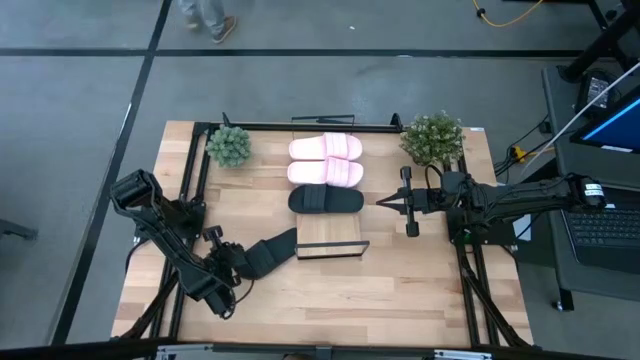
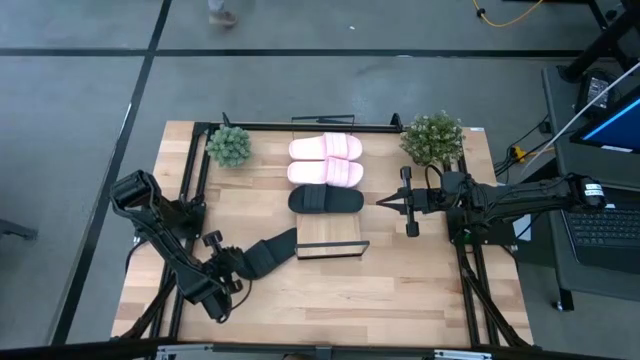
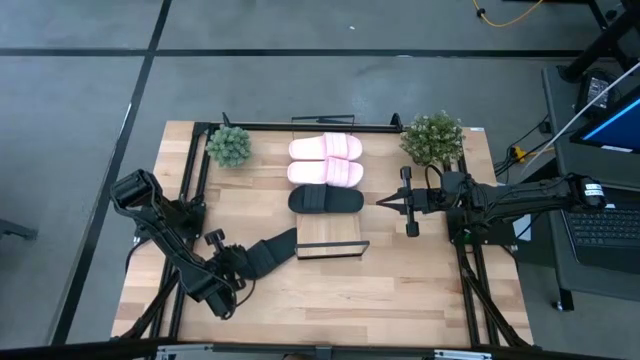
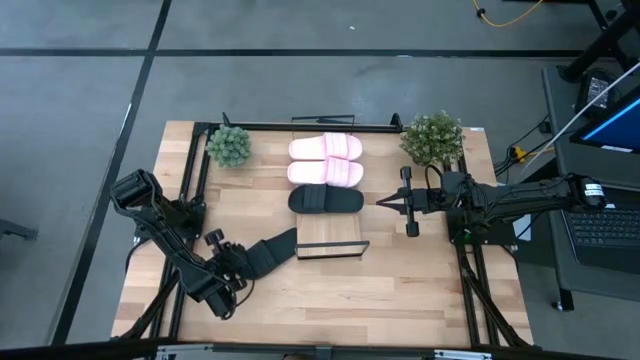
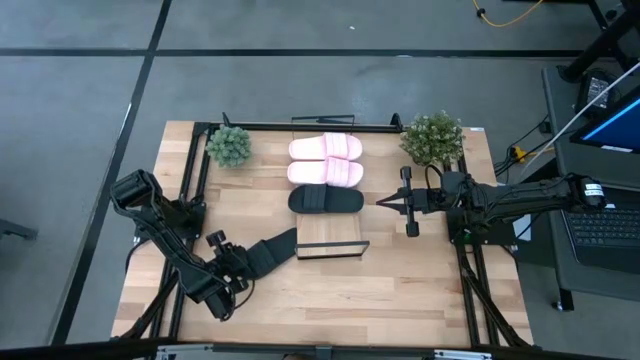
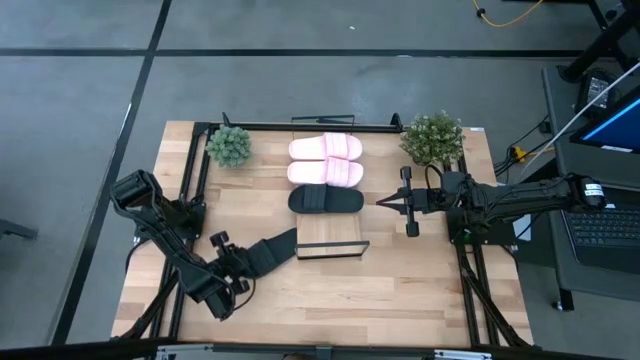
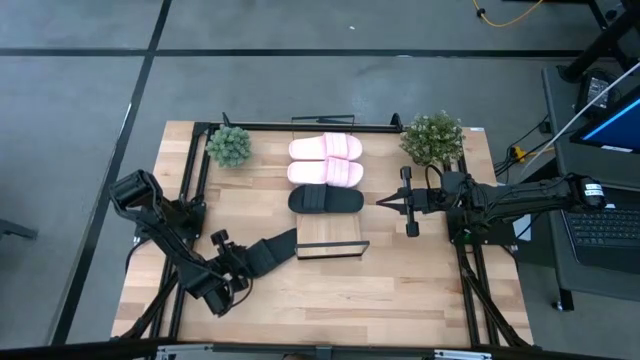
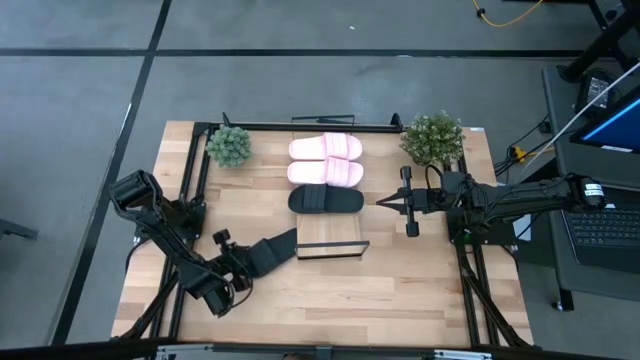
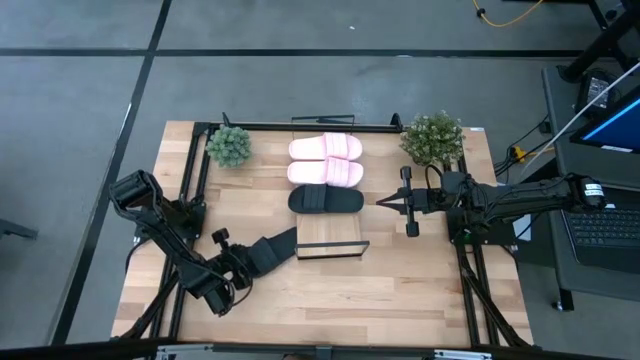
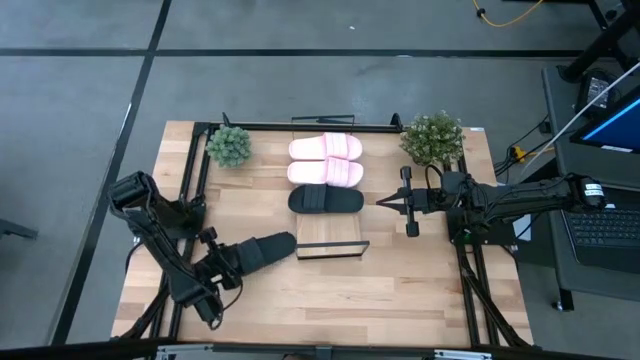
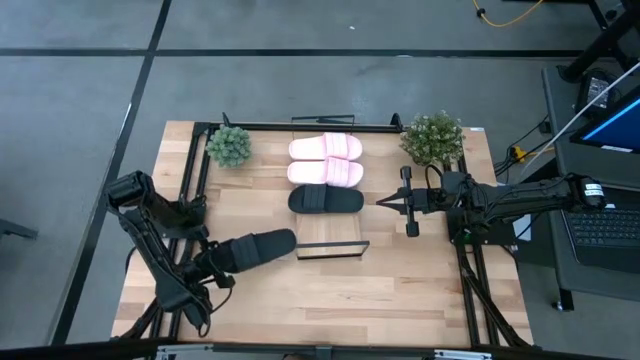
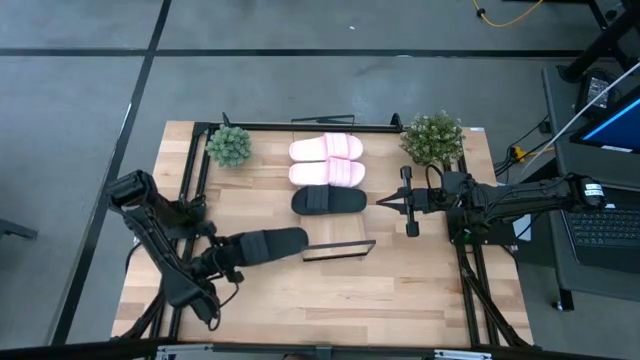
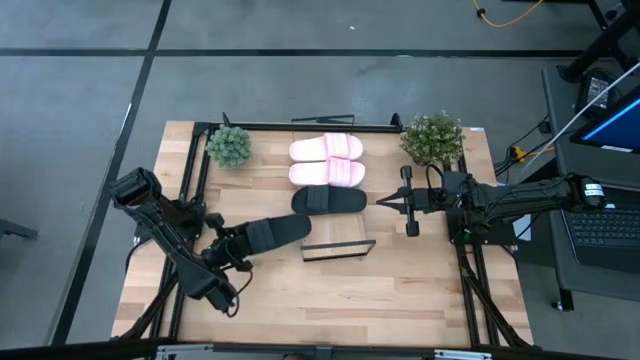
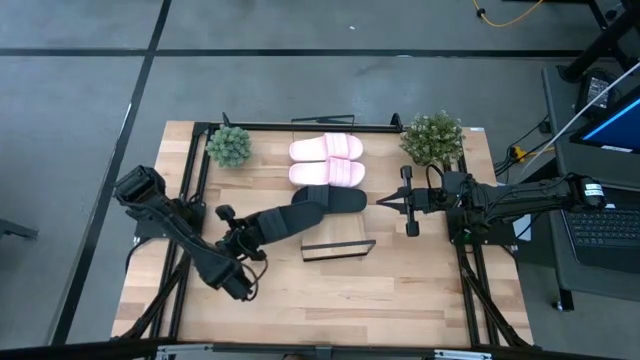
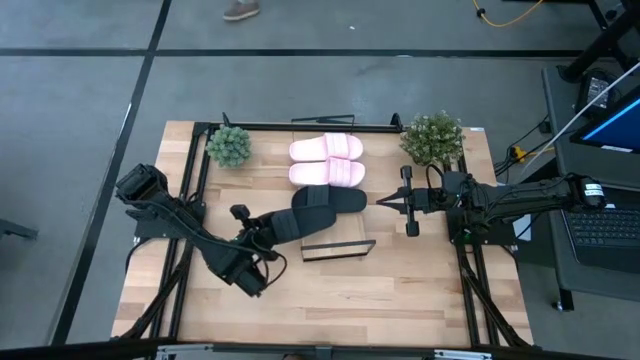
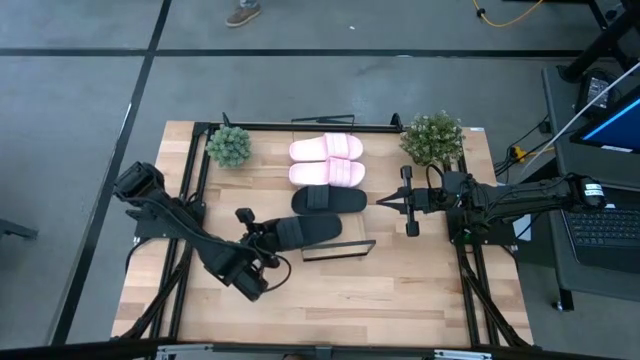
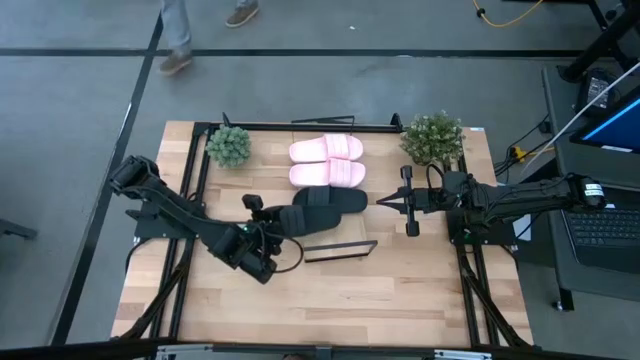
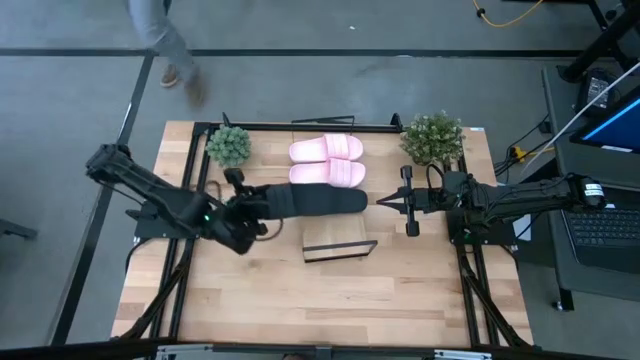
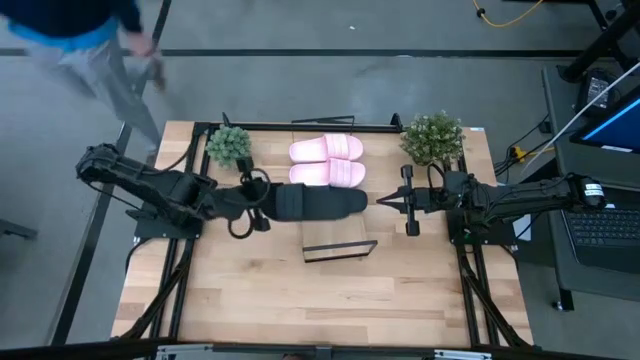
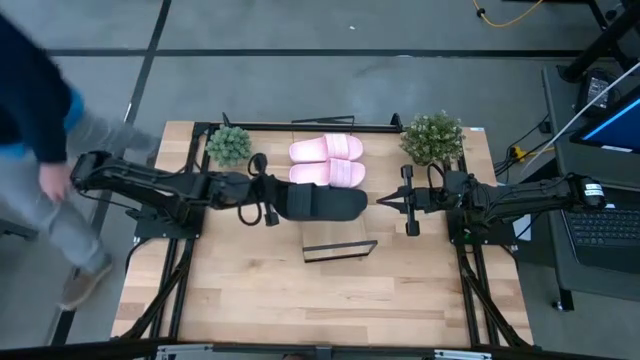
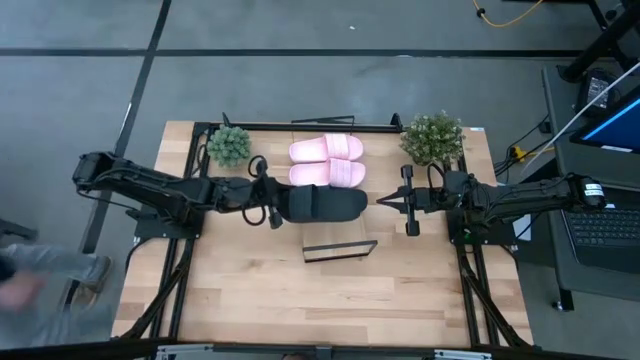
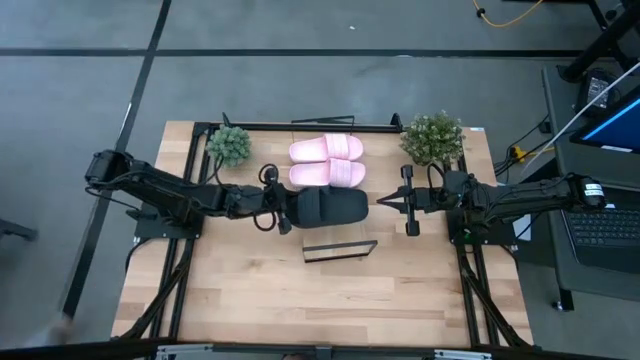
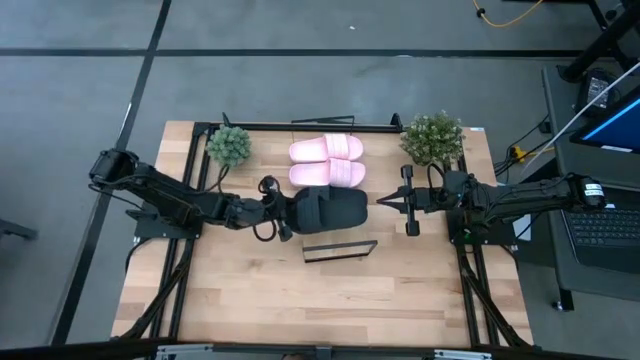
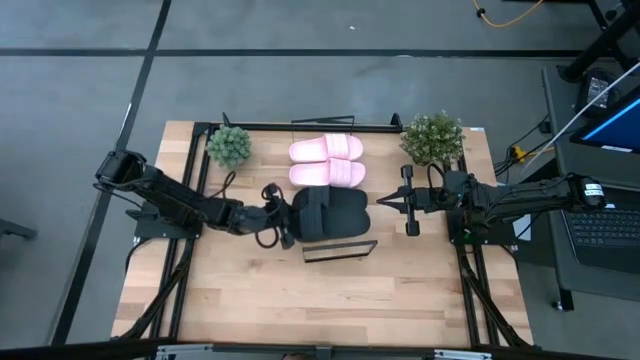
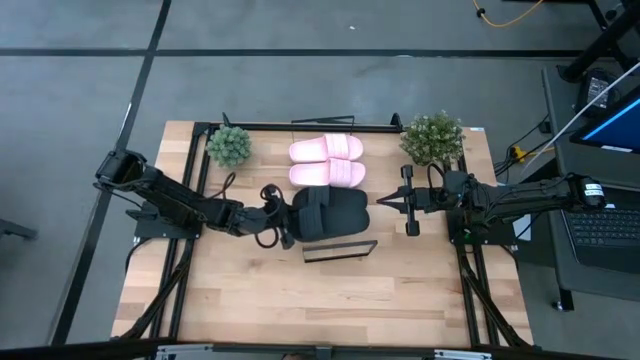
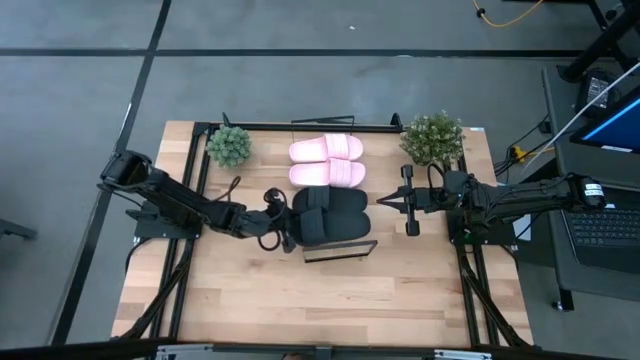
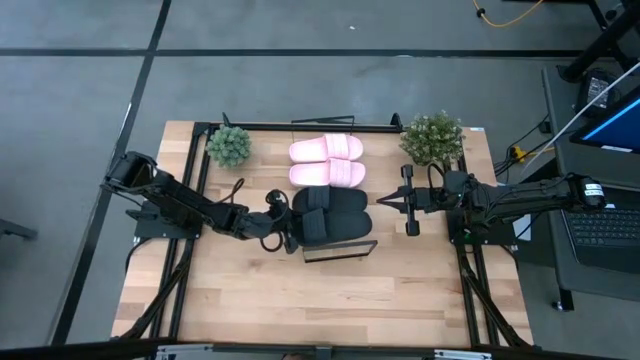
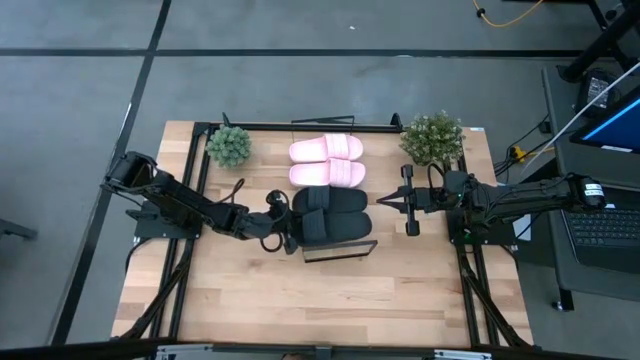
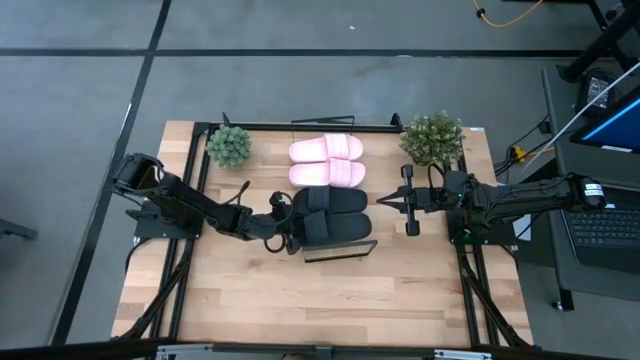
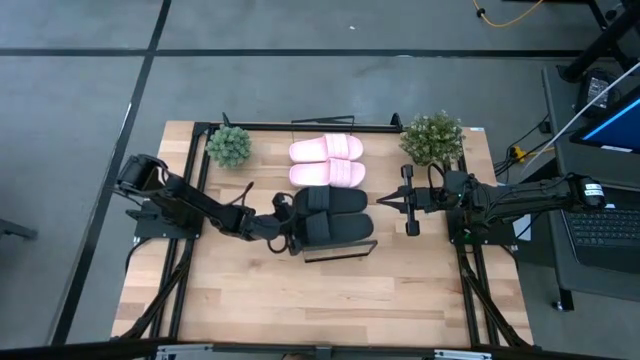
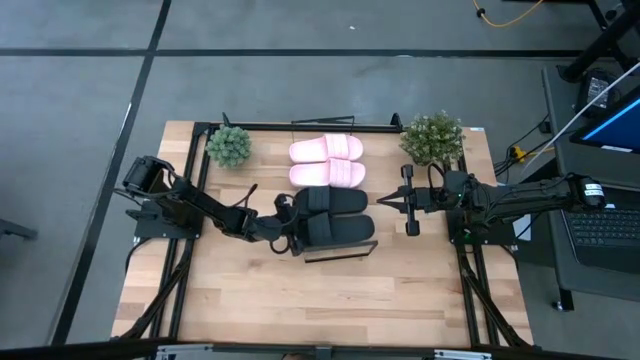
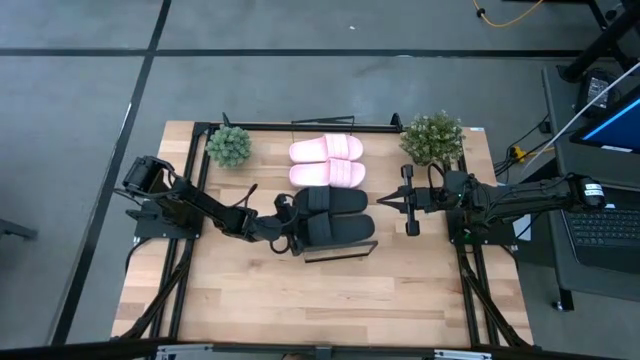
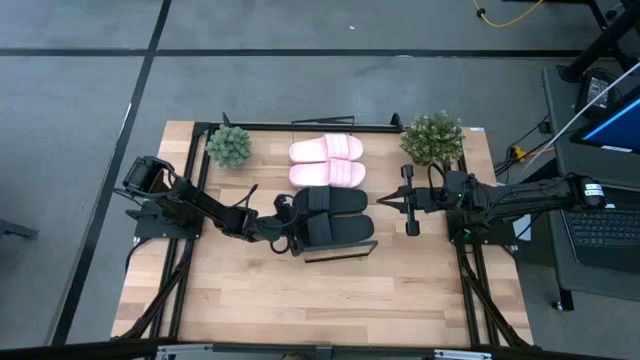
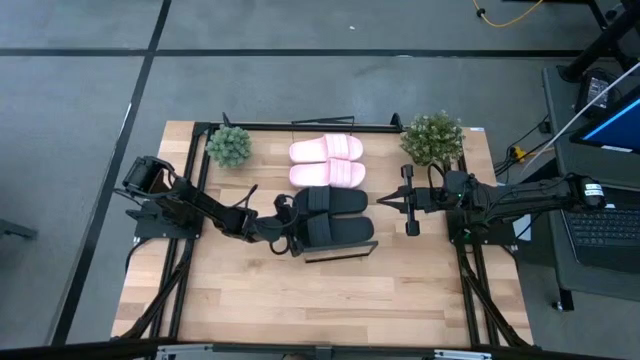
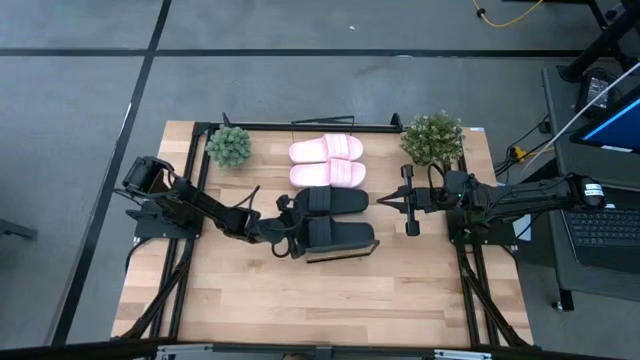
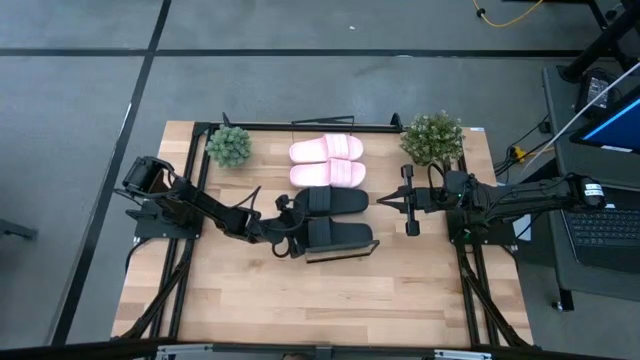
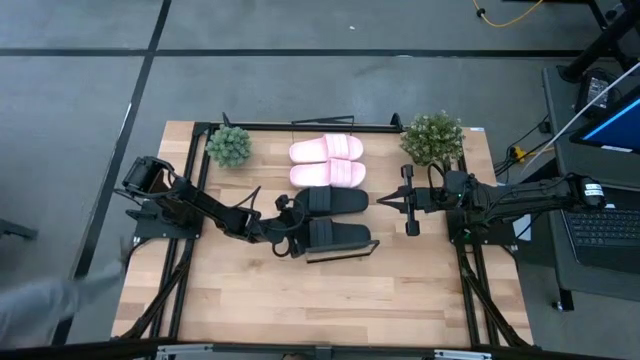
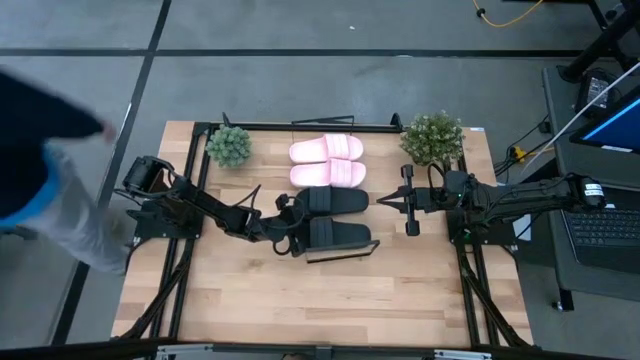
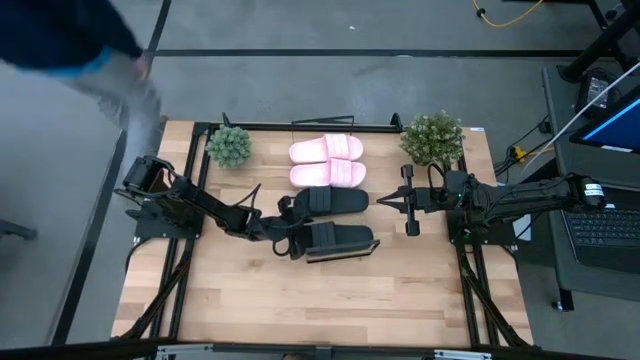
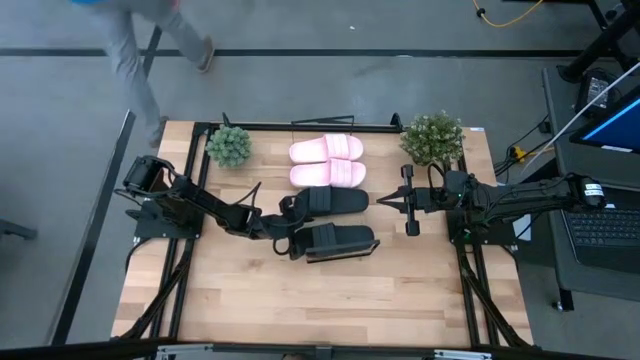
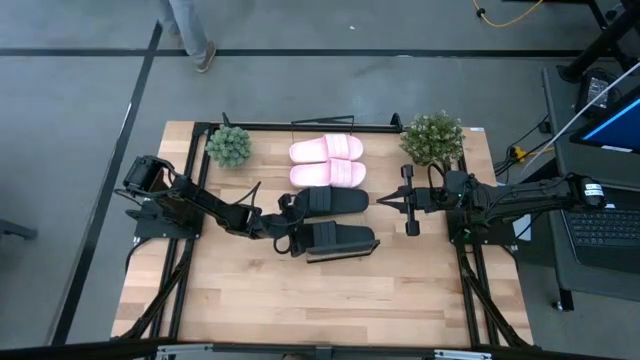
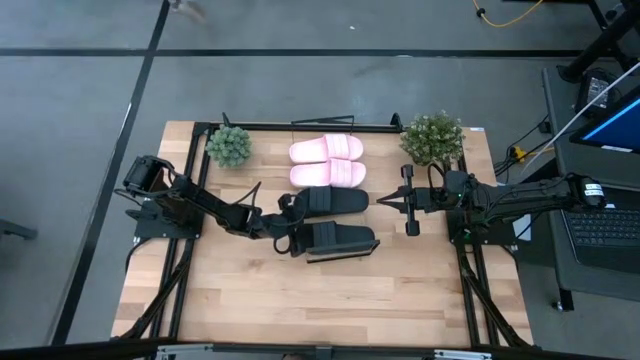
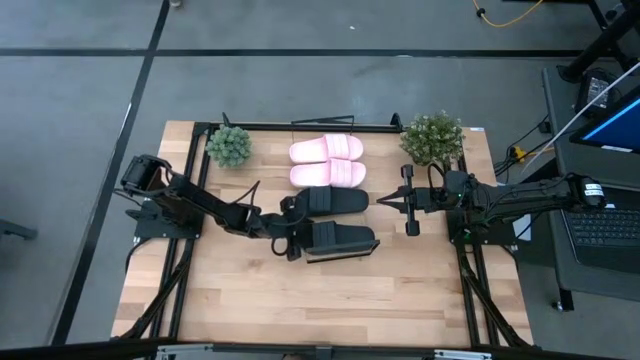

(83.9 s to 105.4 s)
Task: Pick and place slides into the shelf
Put the black slides on the shelf

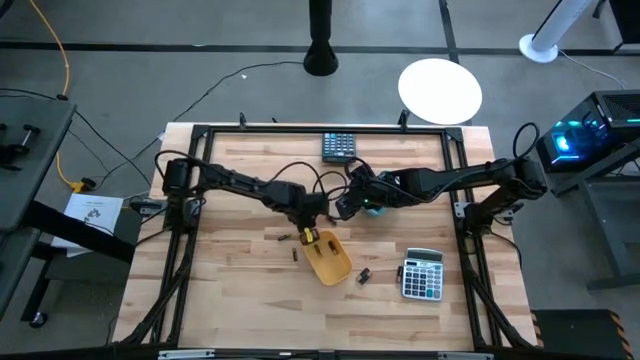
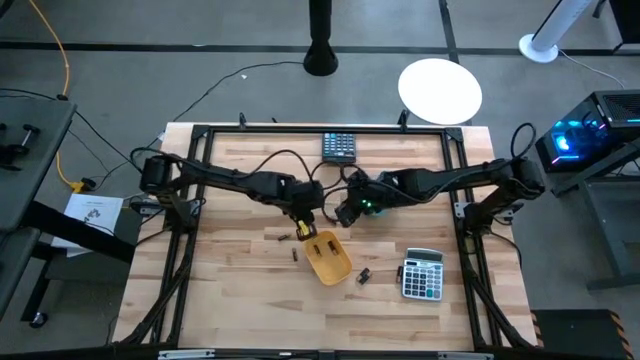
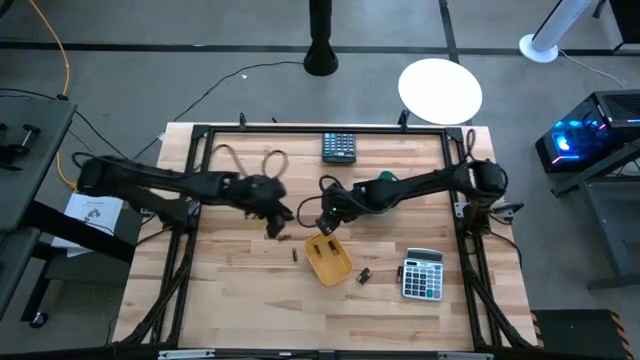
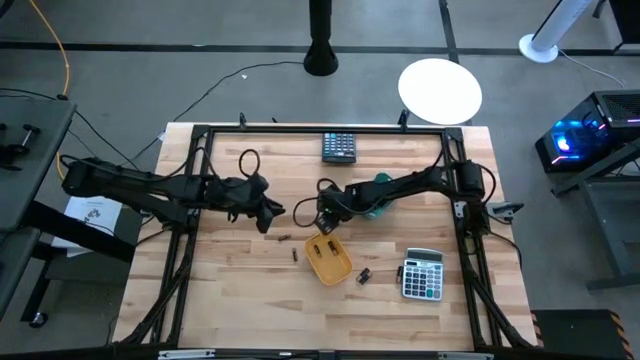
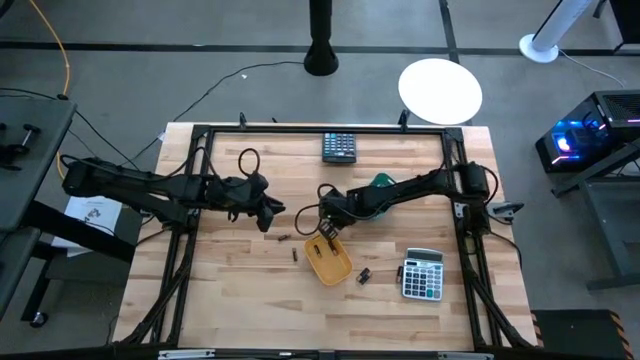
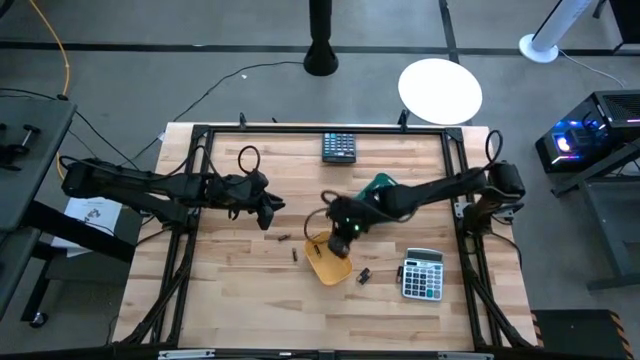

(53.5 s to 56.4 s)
Task: Sort batteries
Put the black battery into the yellow bin
